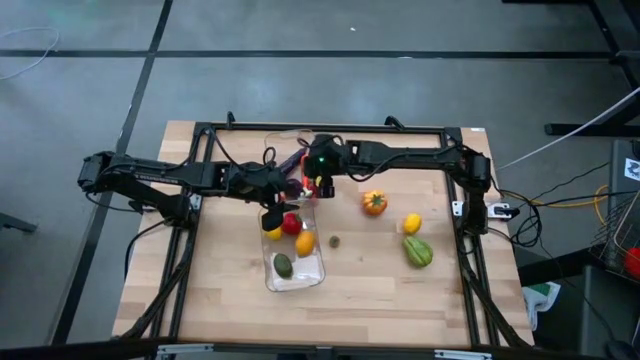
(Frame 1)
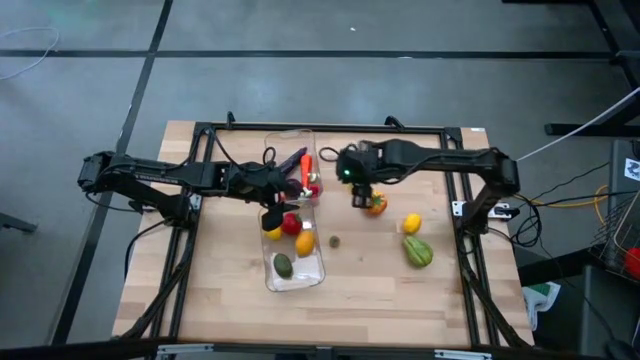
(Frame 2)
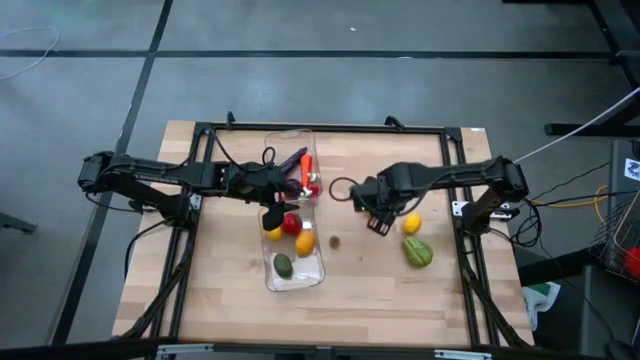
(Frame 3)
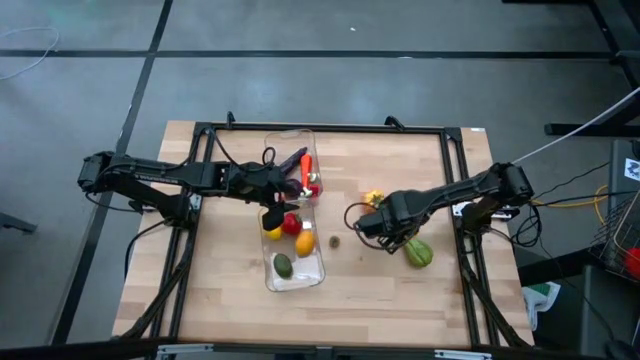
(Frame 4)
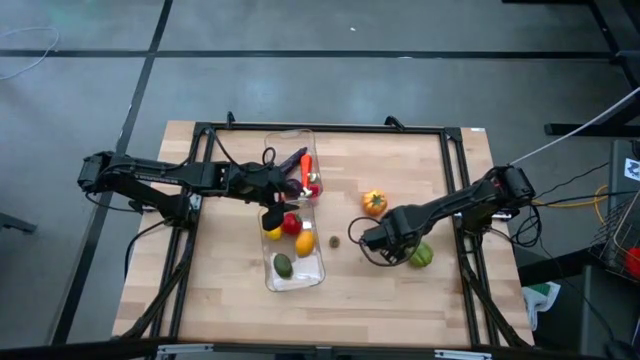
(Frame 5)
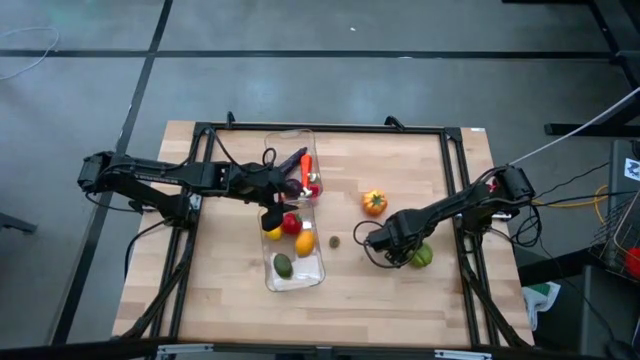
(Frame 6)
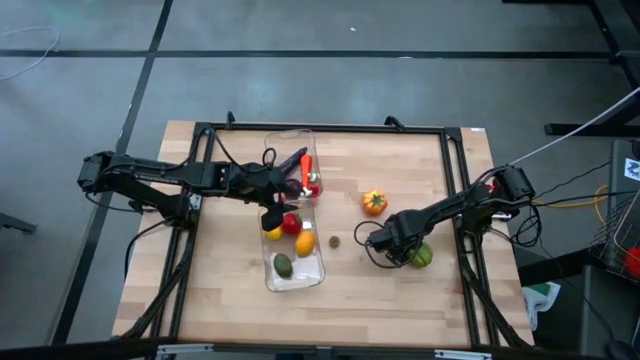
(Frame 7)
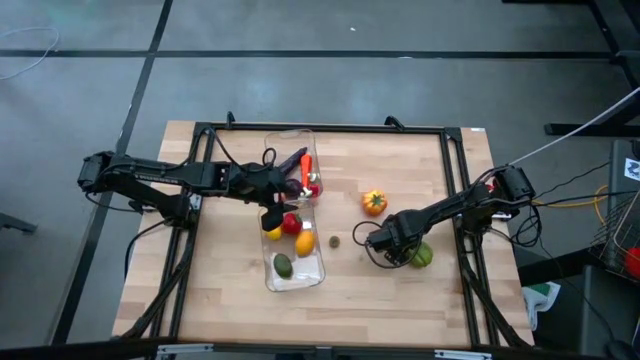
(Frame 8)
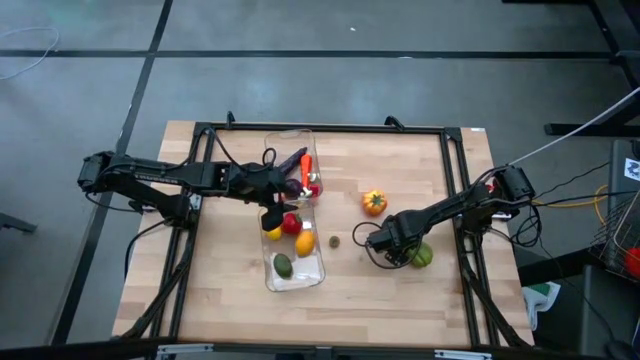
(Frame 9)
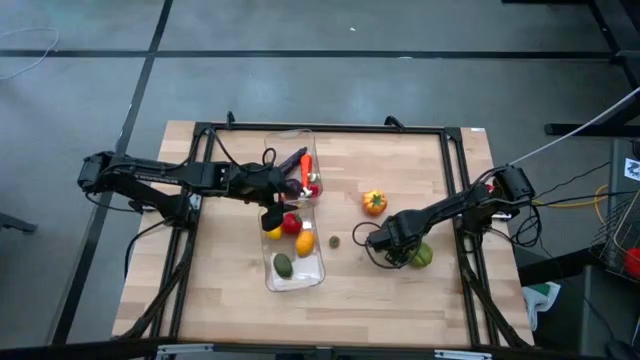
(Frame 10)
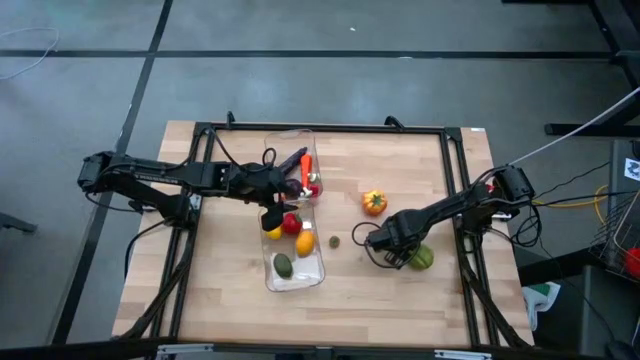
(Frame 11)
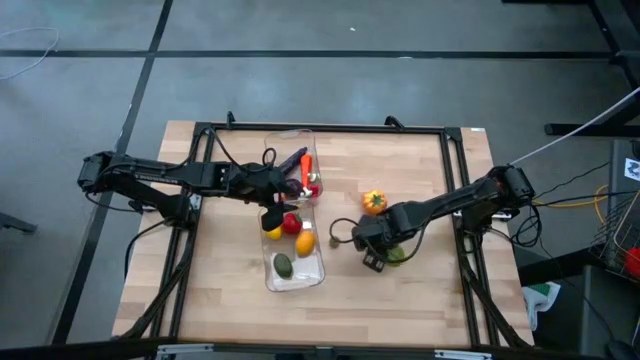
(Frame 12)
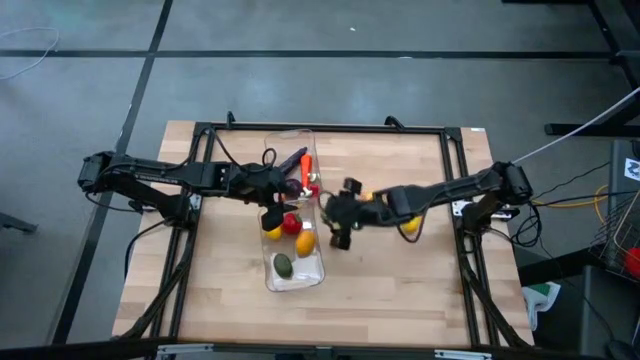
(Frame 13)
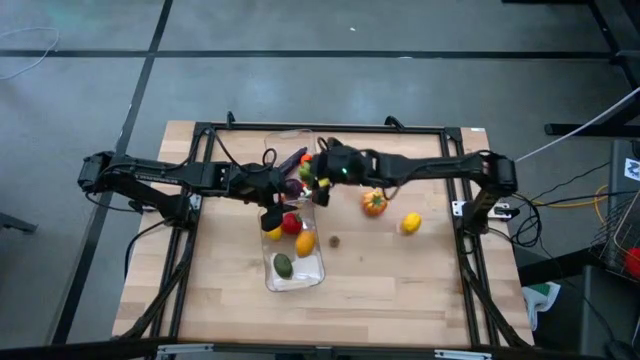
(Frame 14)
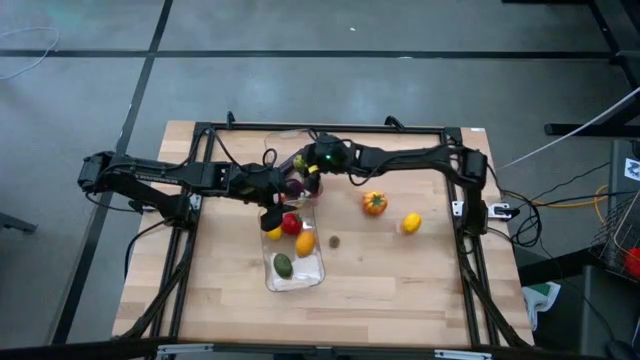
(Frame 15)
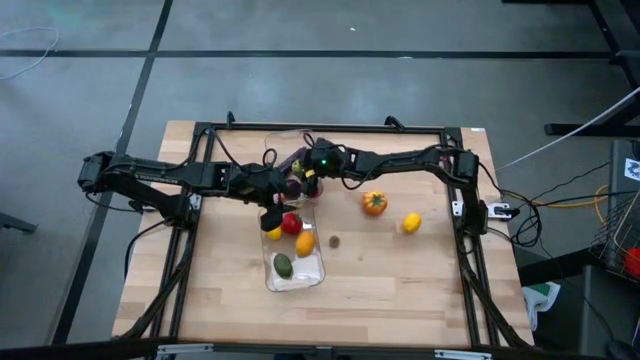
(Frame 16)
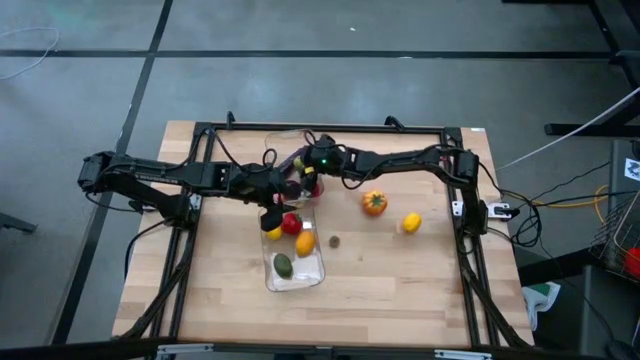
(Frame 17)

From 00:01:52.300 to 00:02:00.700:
Task: Sort produce into baskets
Put the green chayote into the top transparent bin

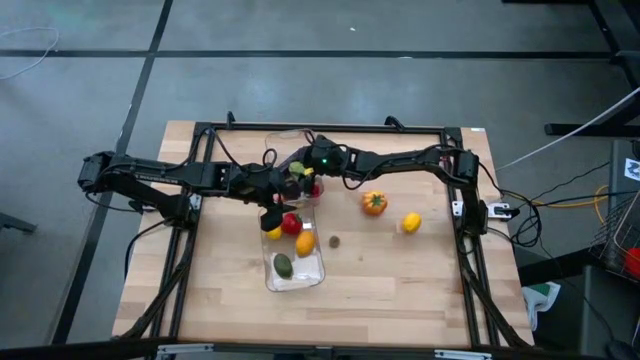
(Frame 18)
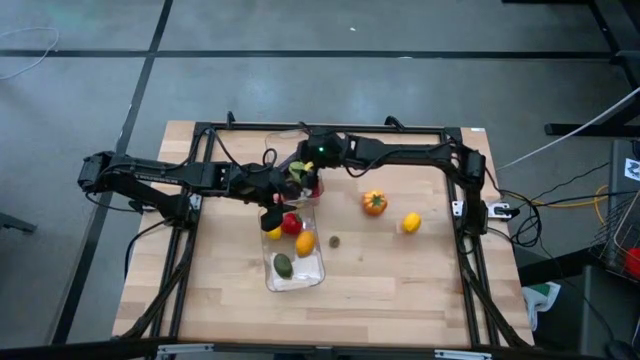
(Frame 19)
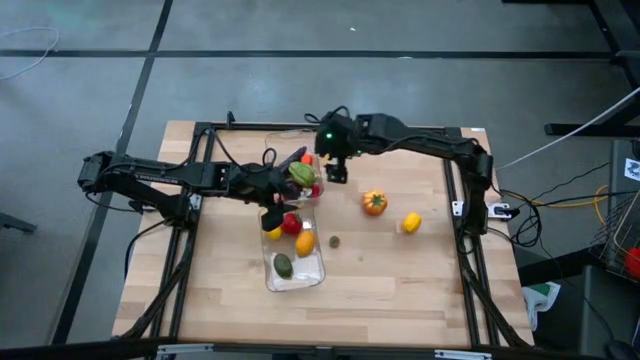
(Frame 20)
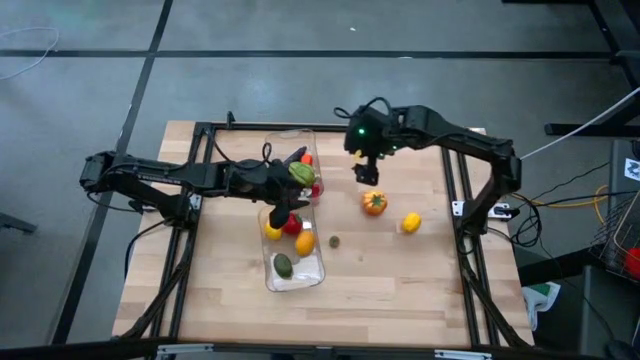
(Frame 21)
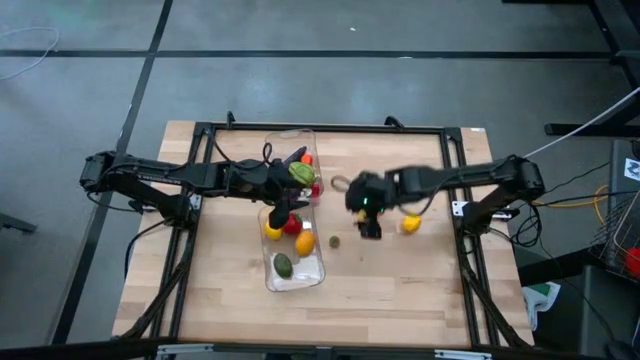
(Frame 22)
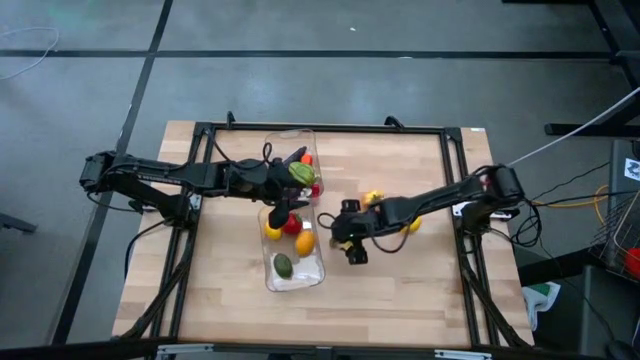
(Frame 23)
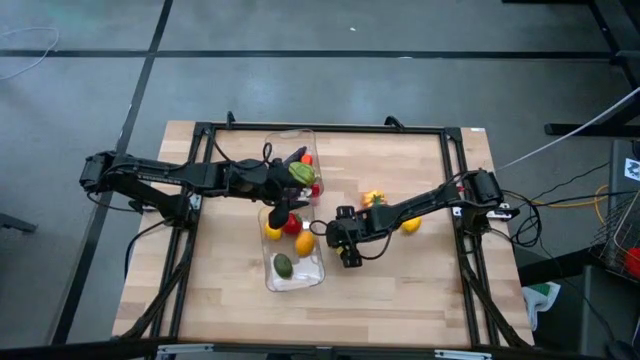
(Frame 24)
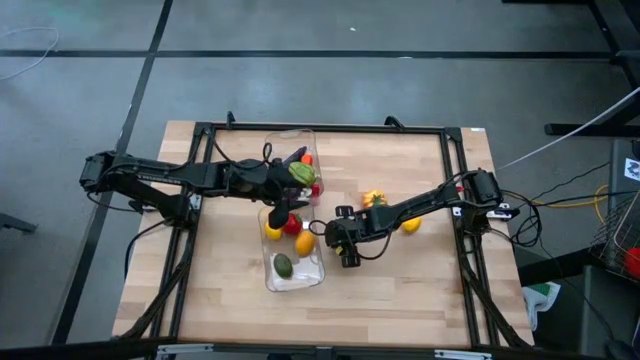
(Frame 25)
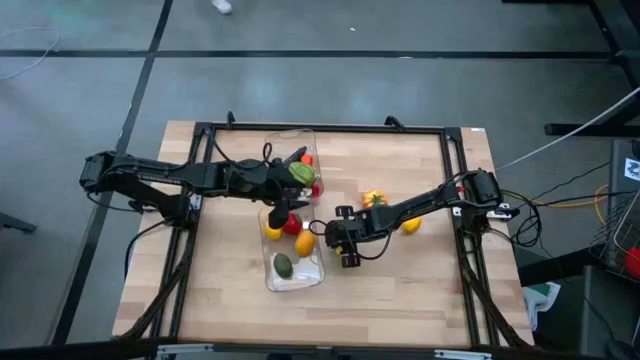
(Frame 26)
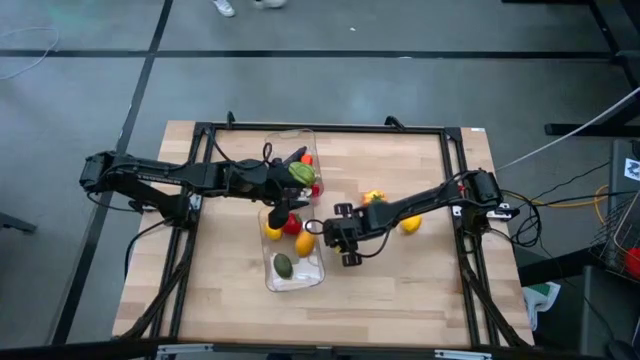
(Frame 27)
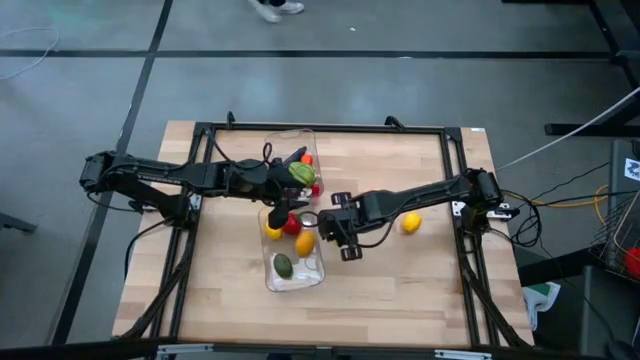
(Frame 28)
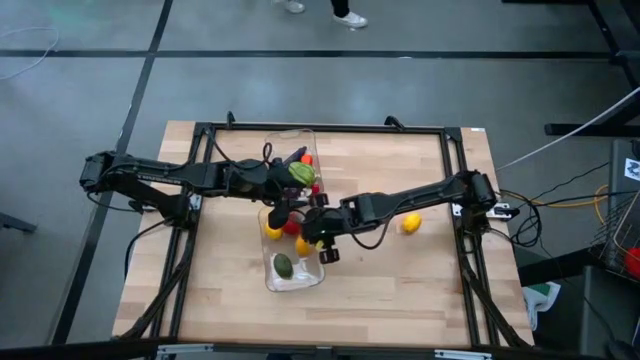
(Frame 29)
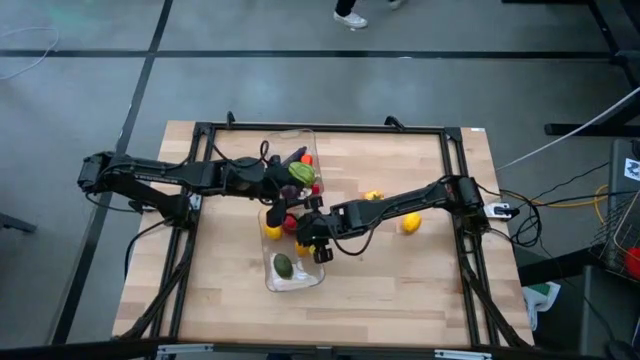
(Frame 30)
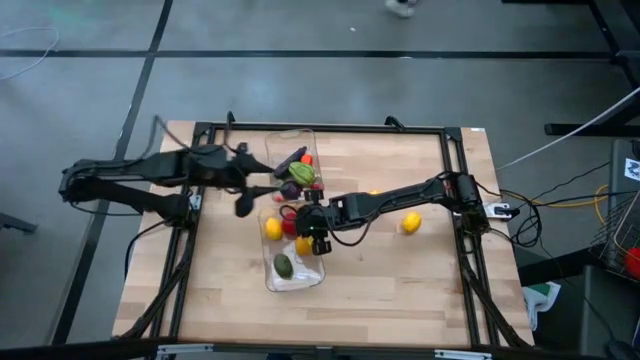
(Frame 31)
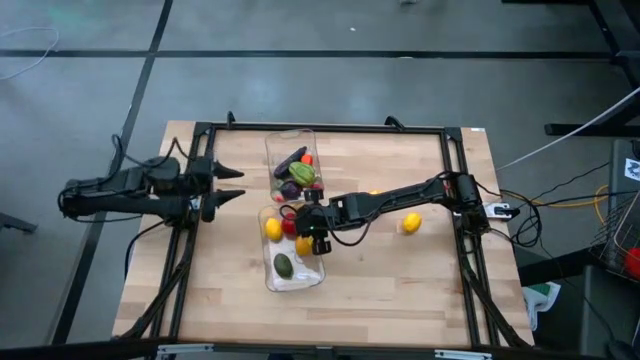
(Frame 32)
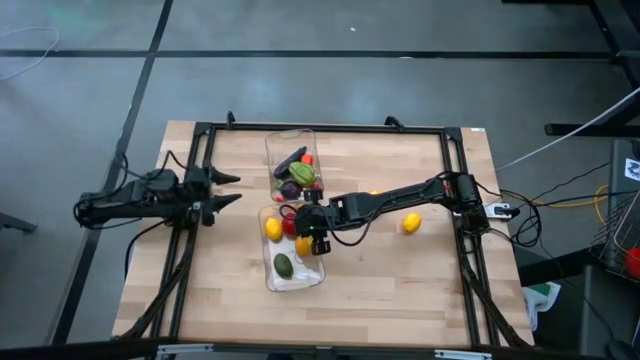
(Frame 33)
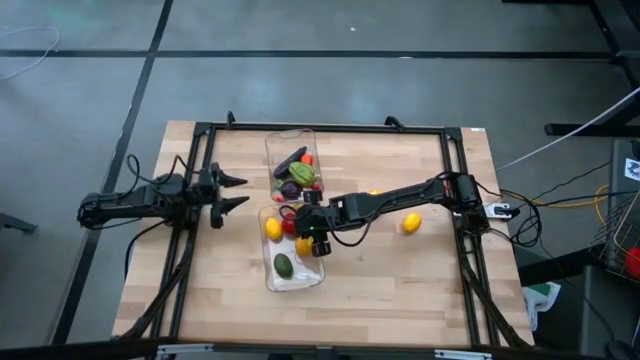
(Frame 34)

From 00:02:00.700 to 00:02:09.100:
Put the orange tomato into the bottom transparent bin

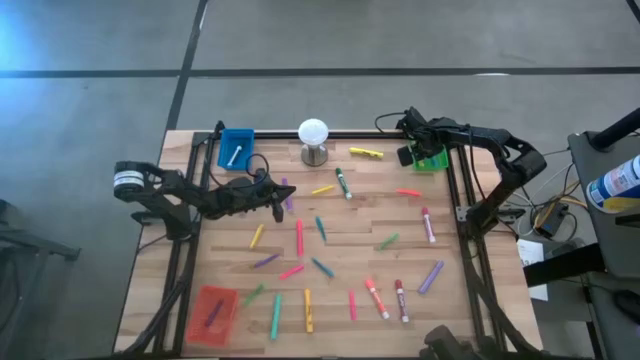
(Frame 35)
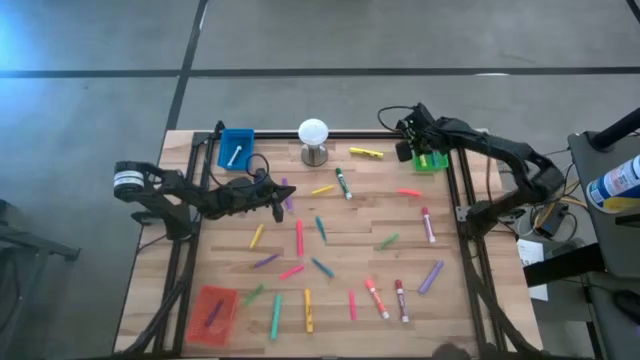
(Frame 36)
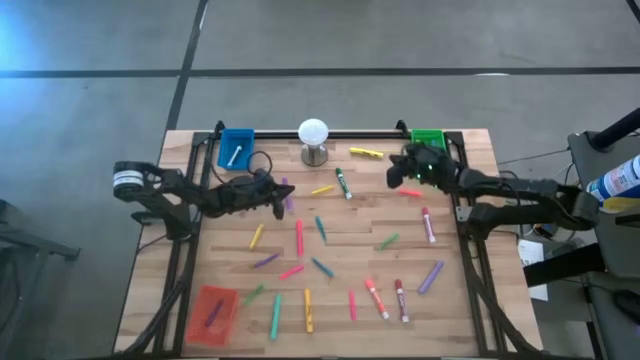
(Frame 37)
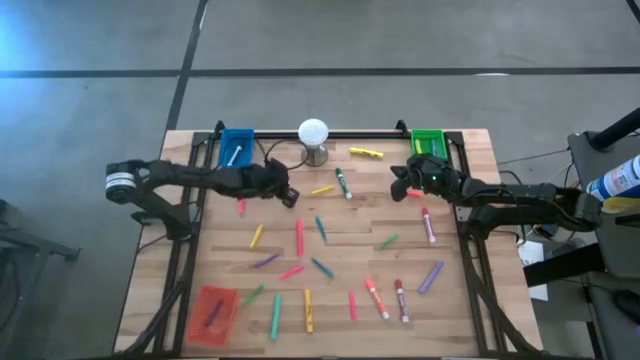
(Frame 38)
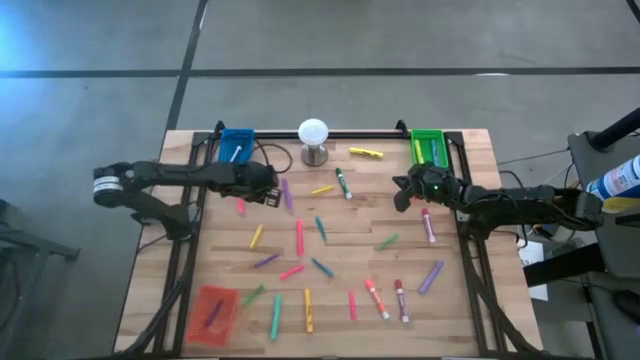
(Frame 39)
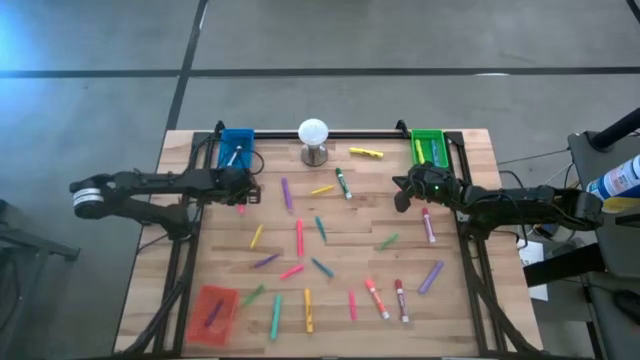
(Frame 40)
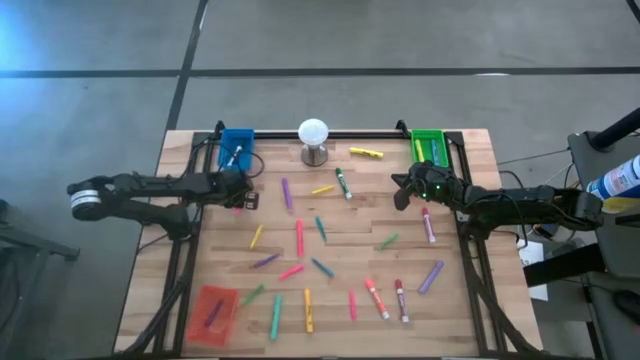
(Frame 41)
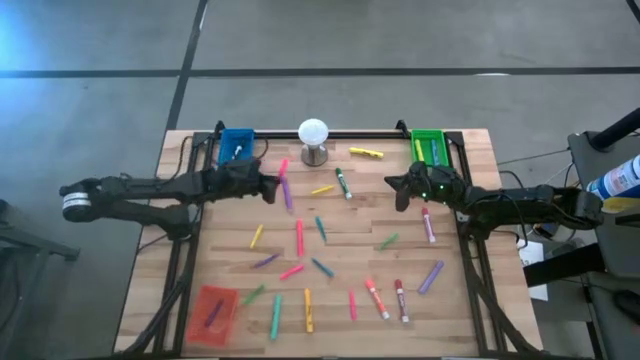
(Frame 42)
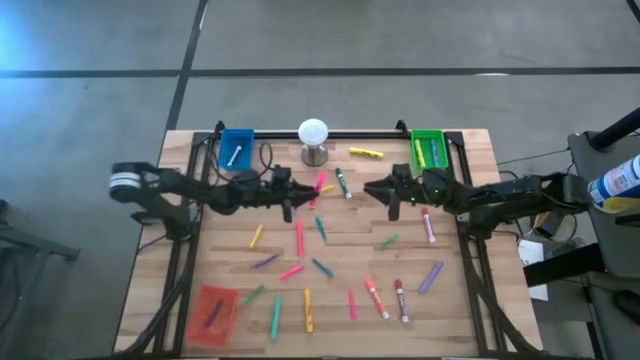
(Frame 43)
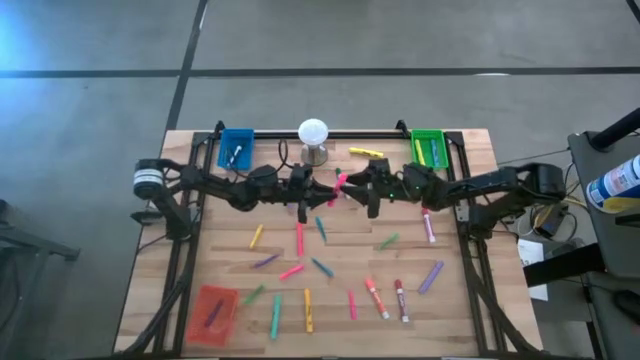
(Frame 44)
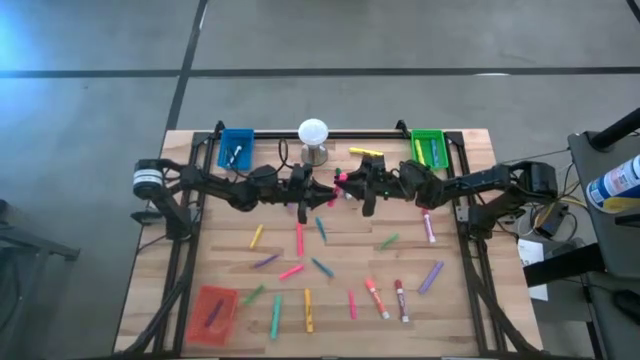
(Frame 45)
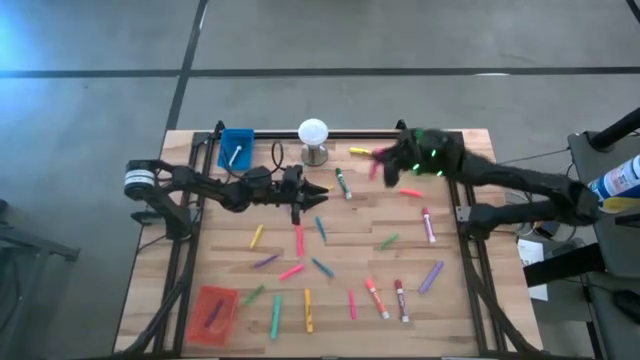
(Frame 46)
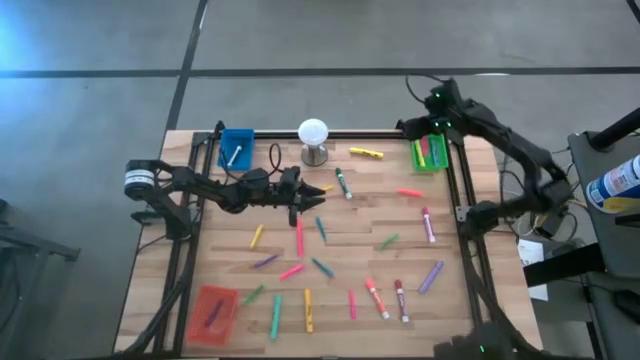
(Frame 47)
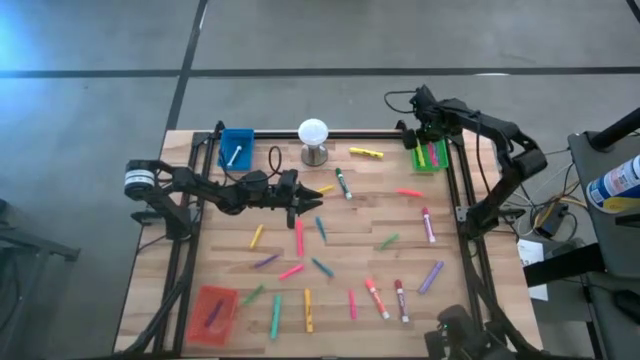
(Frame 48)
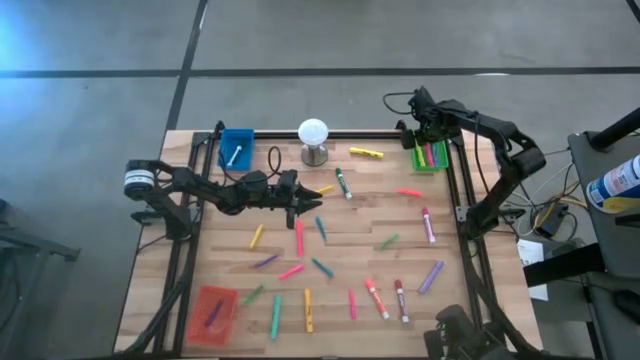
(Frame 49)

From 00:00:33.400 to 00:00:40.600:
Task: Pick & Place Markers
Put the top pink highlighter pen into the green bin
